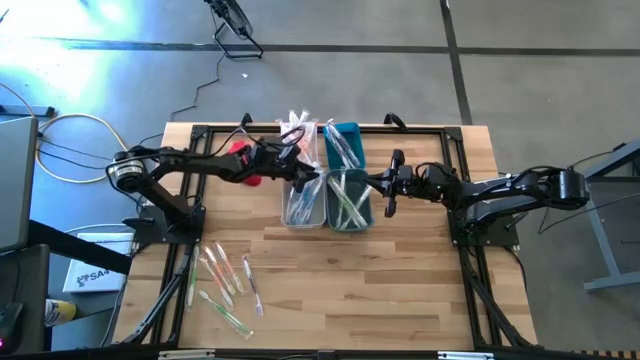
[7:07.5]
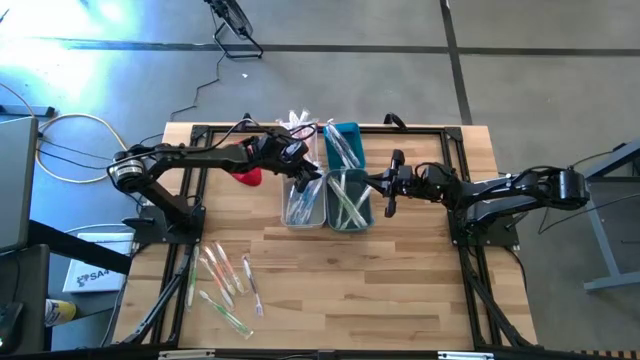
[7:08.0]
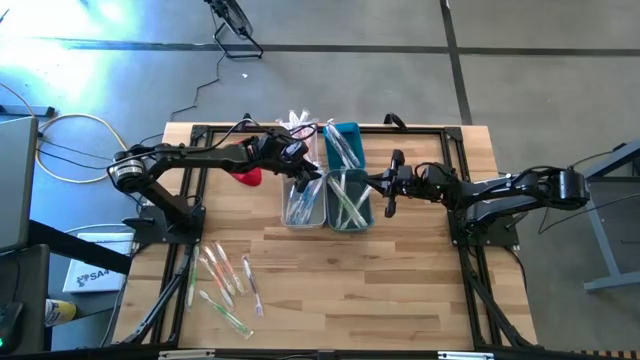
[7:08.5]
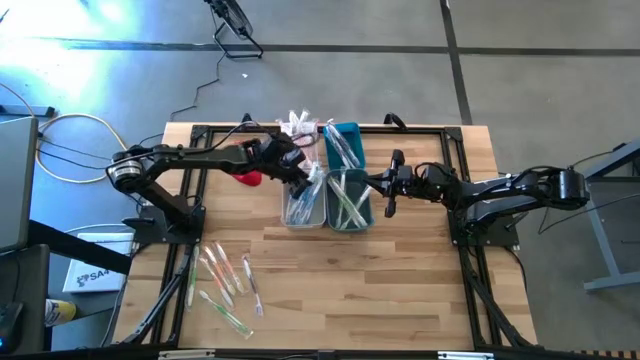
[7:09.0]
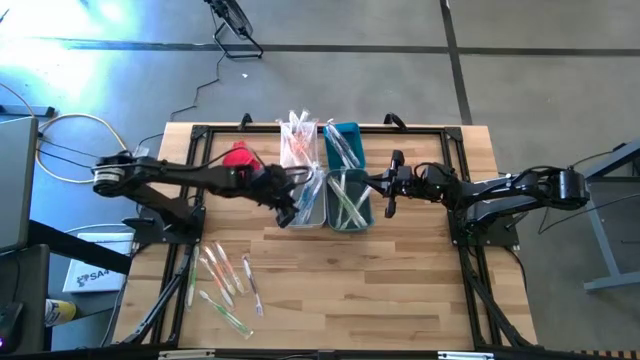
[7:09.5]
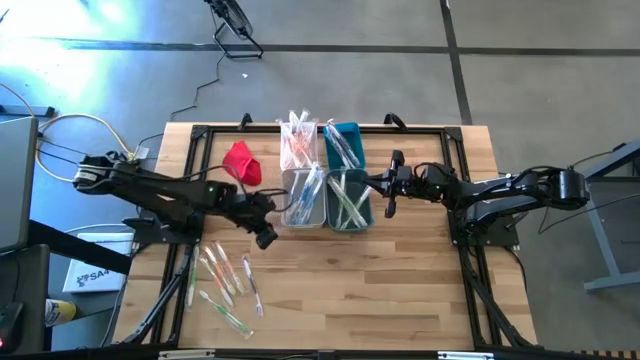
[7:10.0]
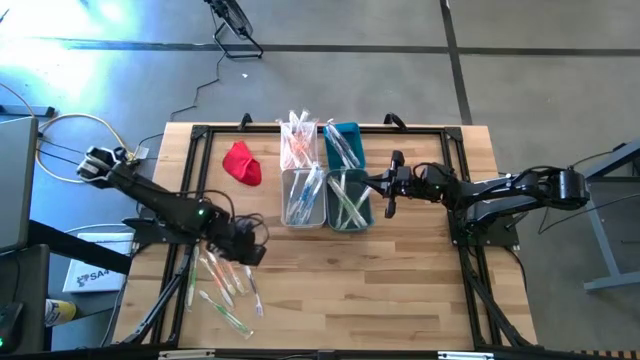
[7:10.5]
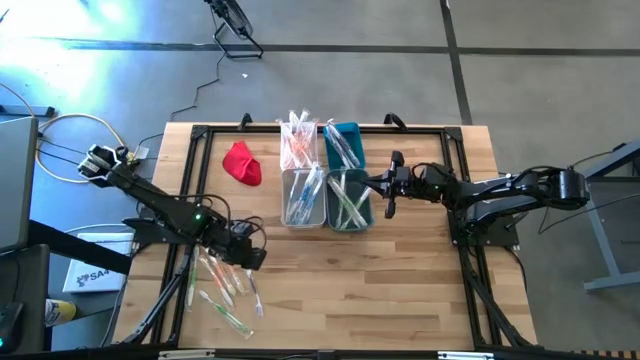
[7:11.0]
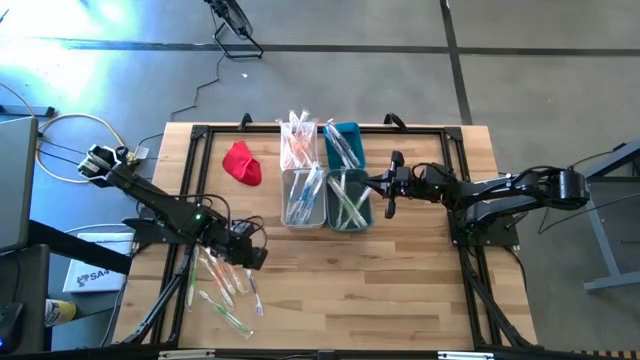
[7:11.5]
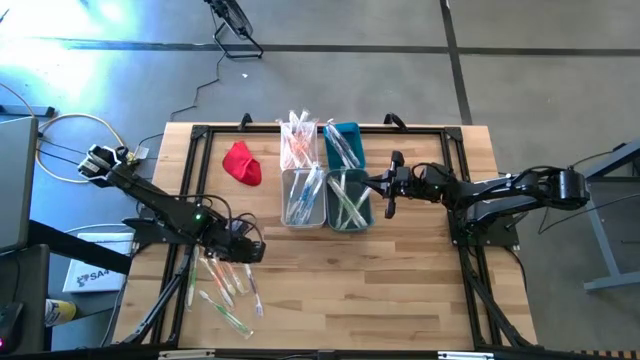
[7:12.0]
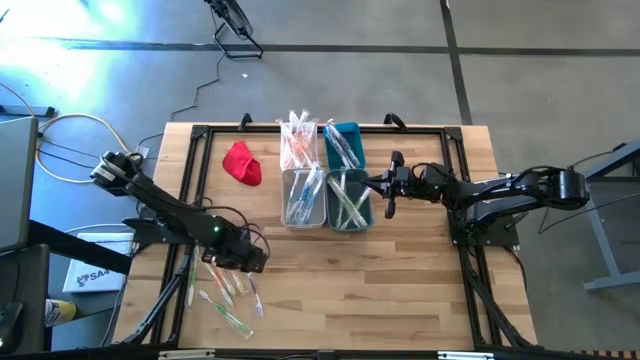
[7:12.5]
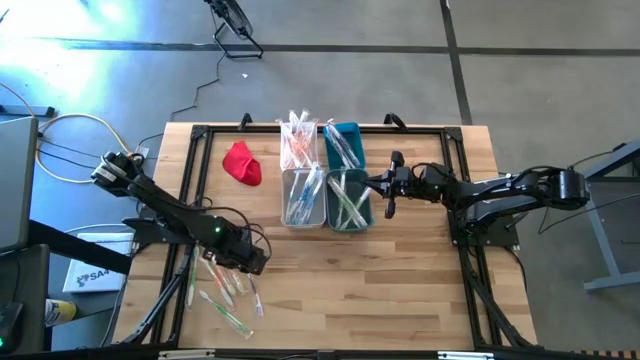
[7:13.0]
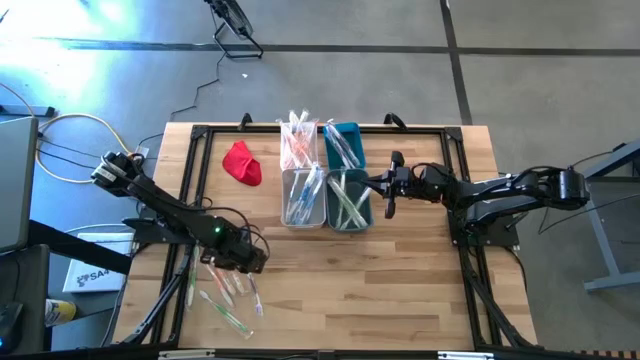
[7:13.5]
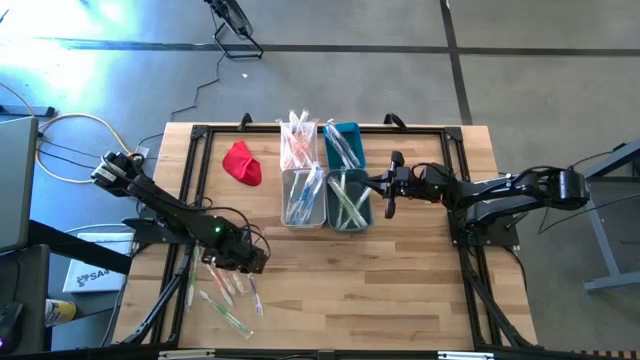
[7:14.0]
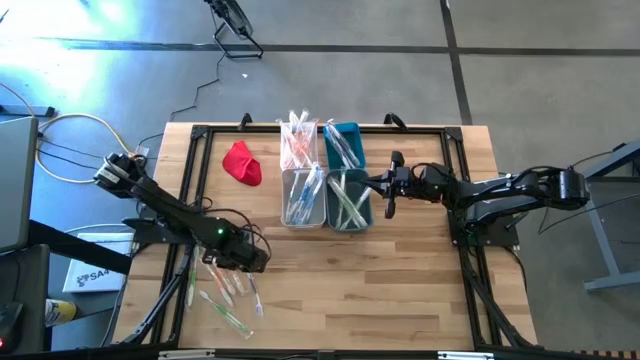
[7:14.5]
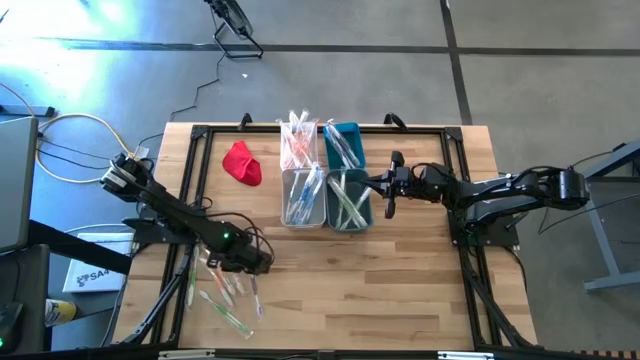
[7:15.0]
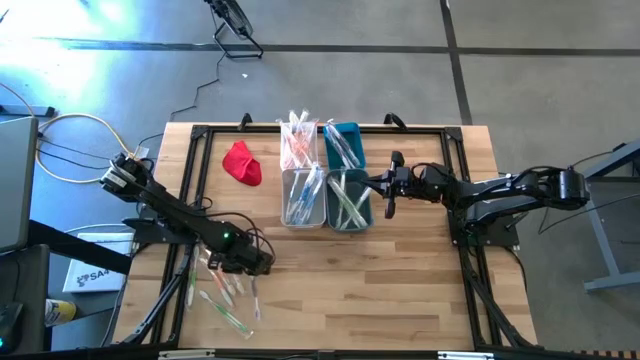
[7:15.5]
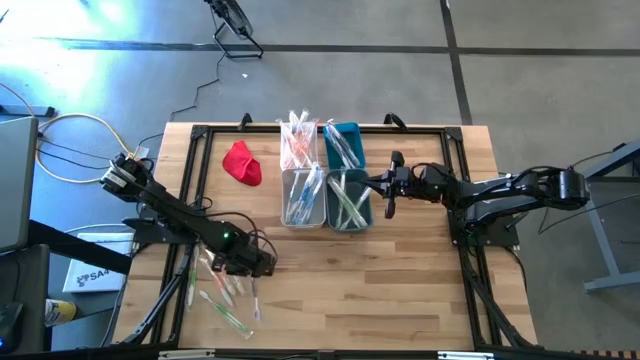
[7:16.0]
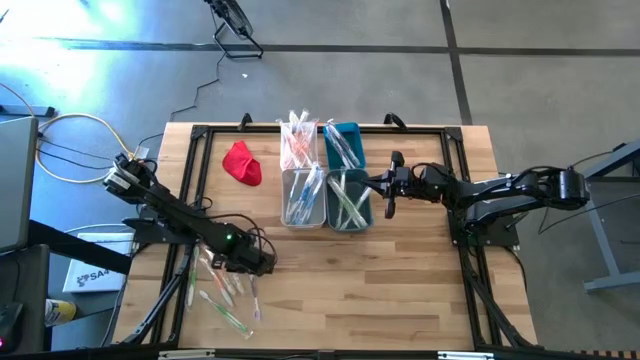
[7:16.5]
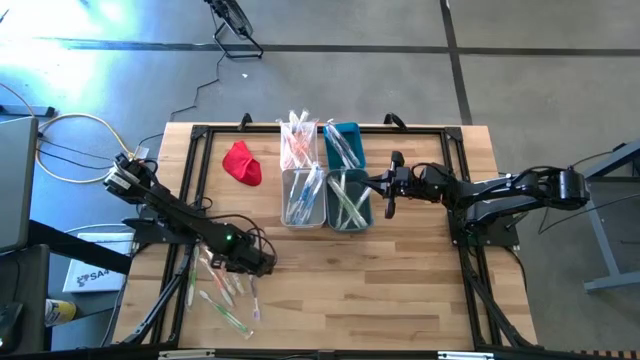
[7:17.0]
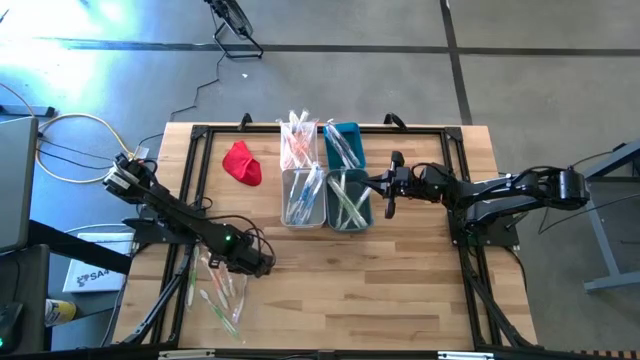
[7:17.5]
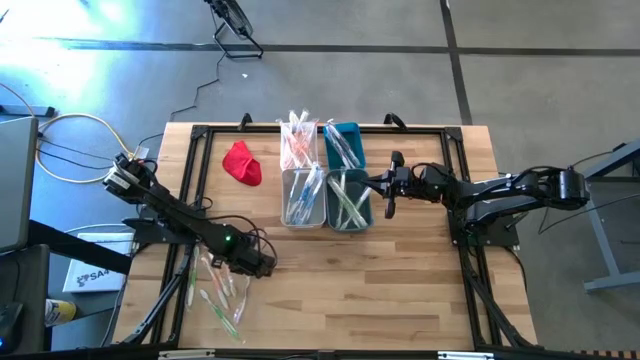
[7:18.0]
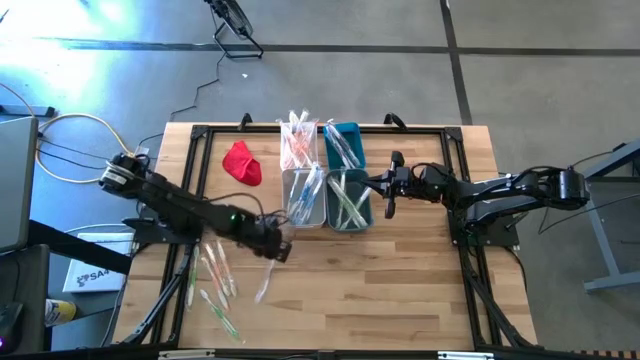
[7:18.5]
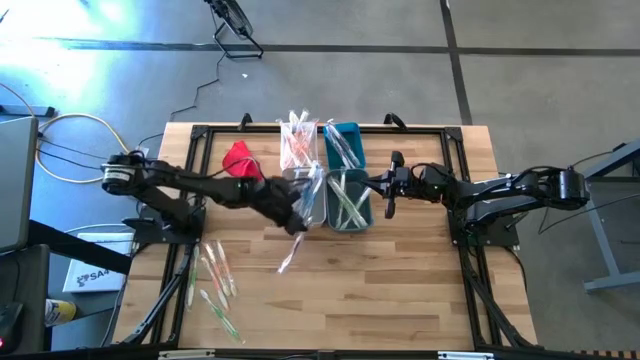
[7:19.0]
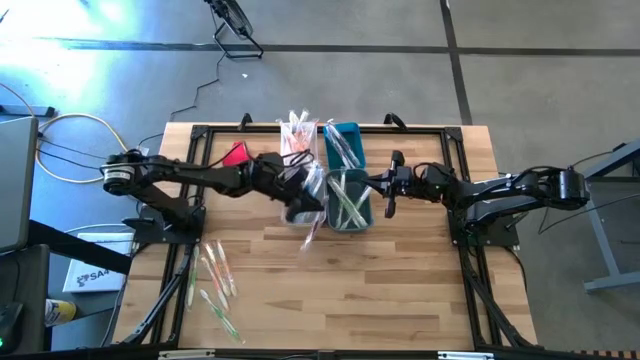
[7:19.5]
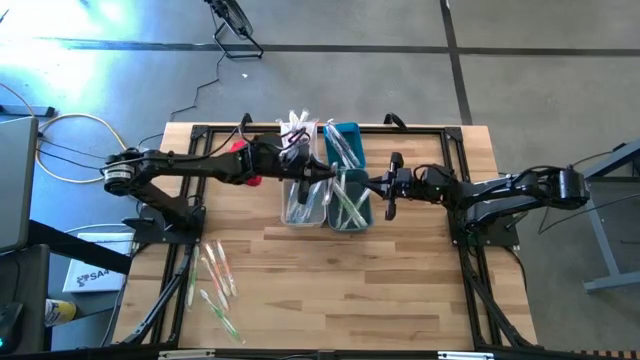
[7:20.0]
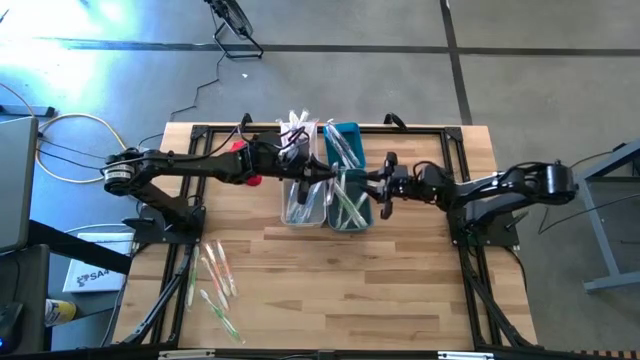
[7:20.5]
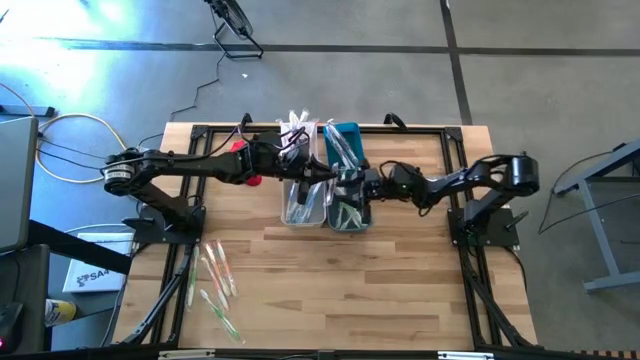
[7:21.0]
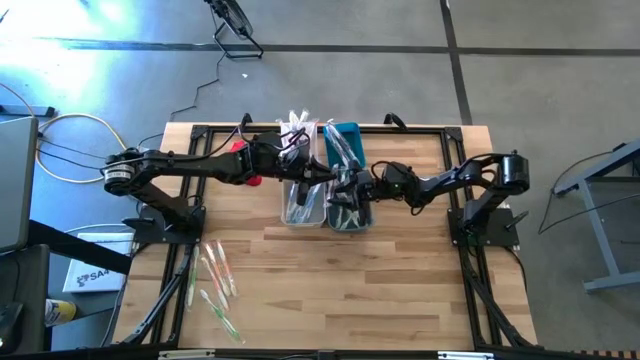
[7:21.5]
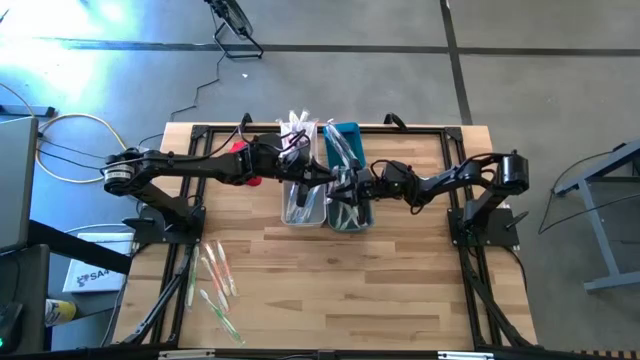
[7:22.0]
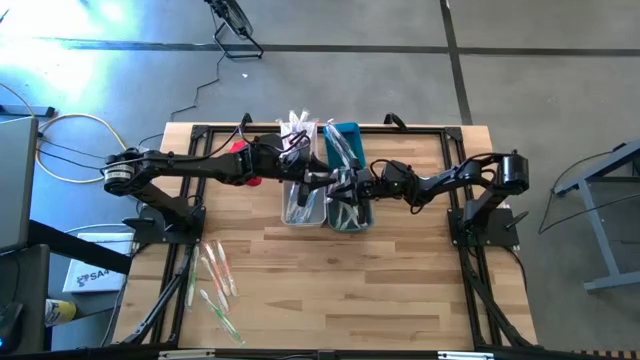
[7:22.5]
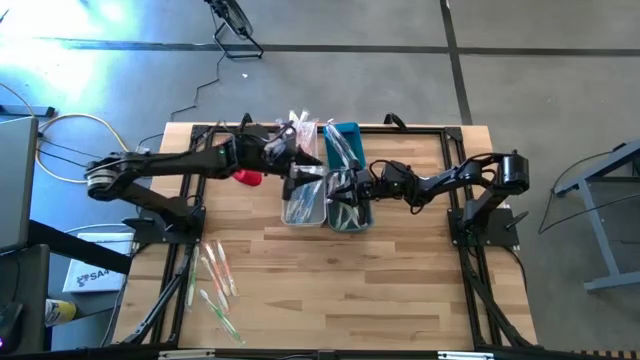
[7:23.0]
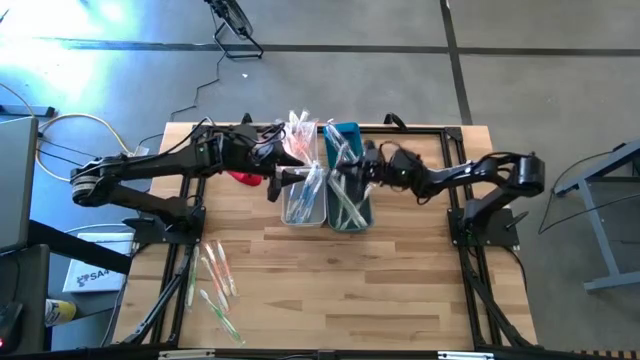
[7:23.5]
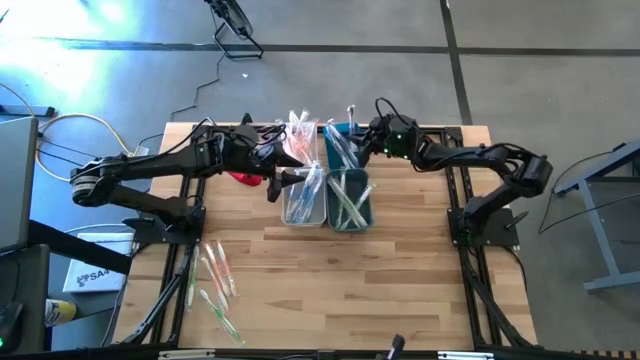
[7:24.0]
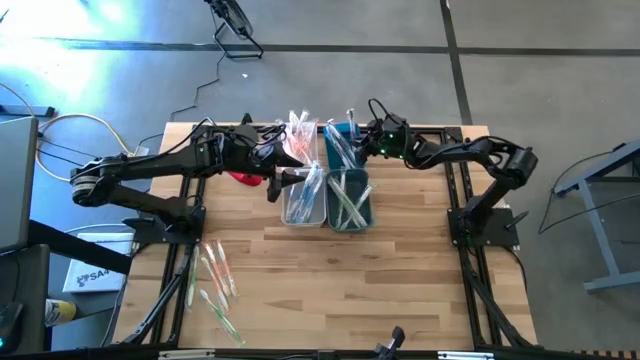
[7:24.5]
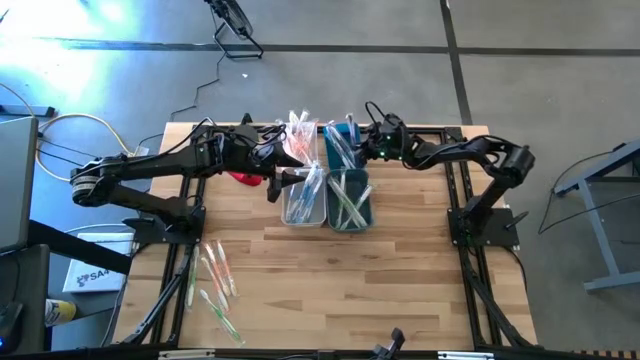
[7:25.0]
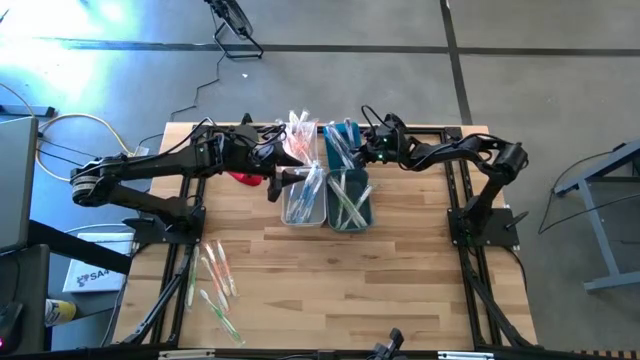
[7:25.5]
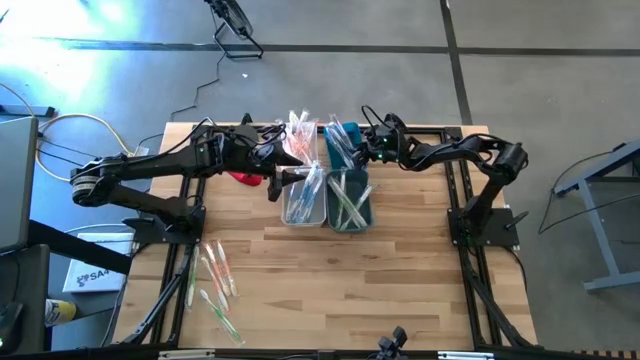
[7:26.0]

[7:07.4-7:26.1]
Task: Pick & Place Toothbrushes
Put the violet toothbrush into the light blue bin
